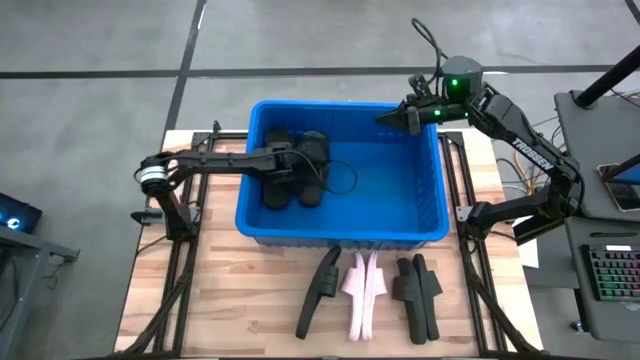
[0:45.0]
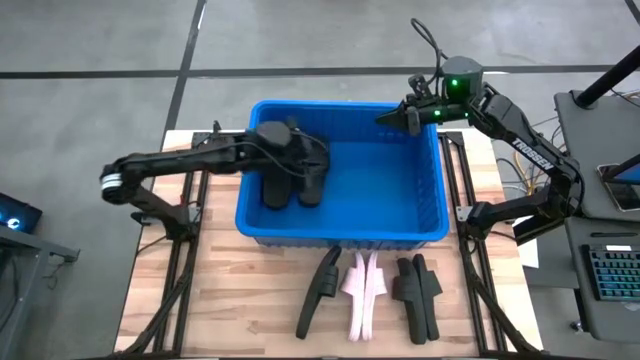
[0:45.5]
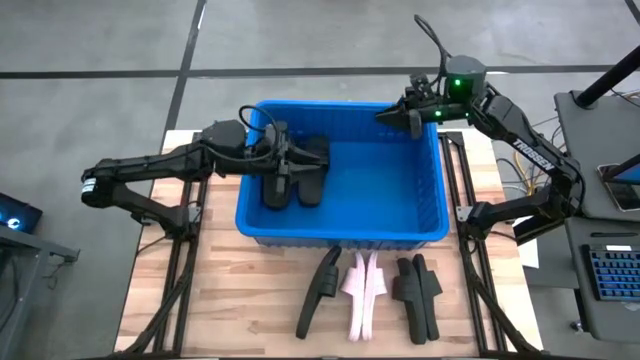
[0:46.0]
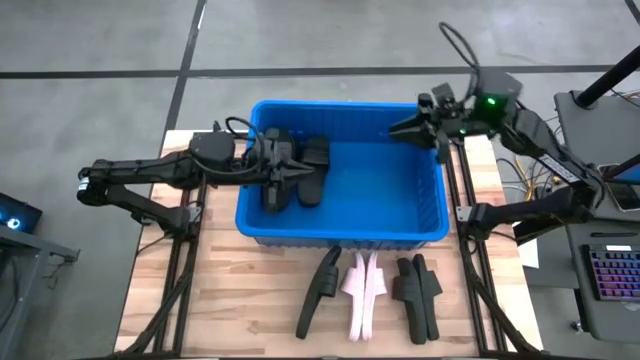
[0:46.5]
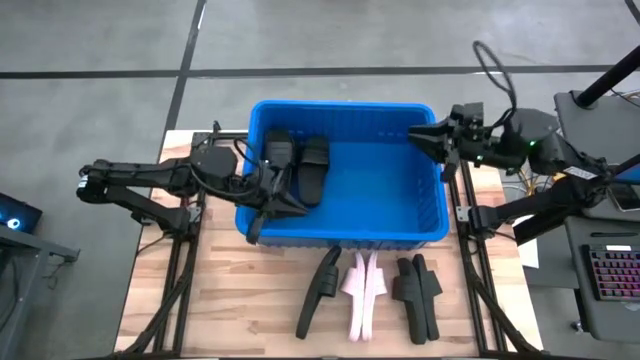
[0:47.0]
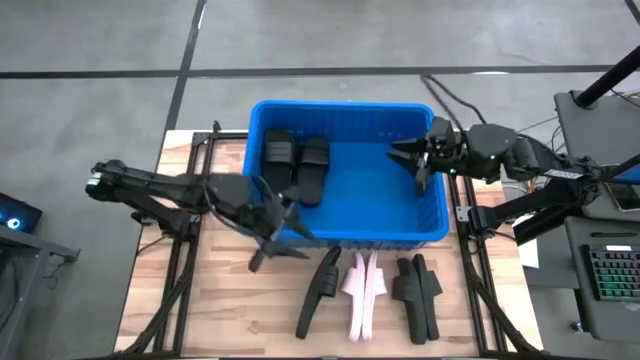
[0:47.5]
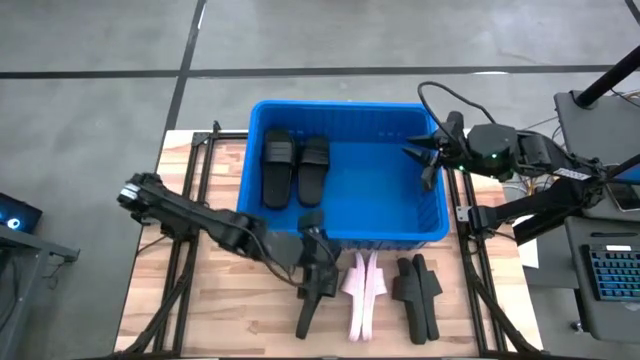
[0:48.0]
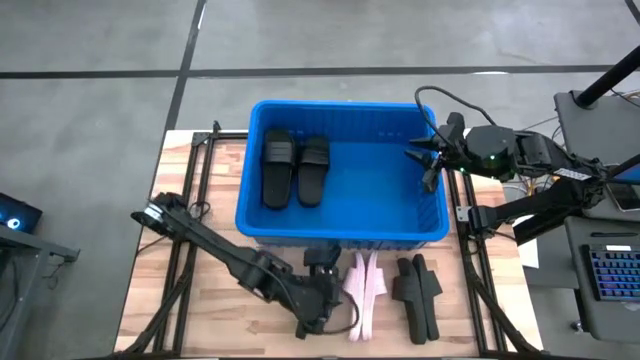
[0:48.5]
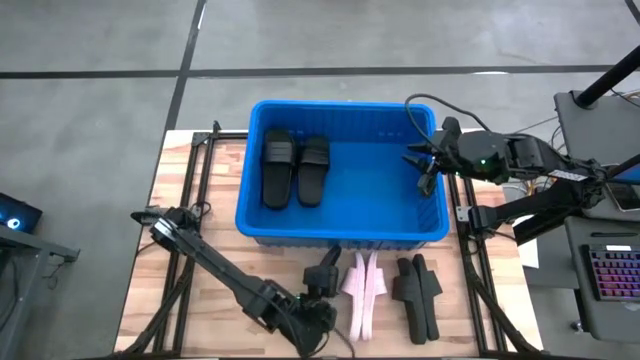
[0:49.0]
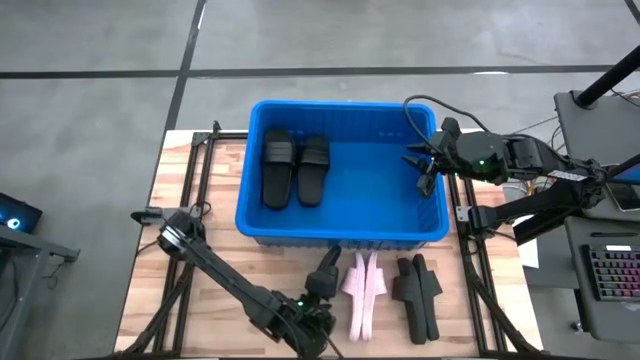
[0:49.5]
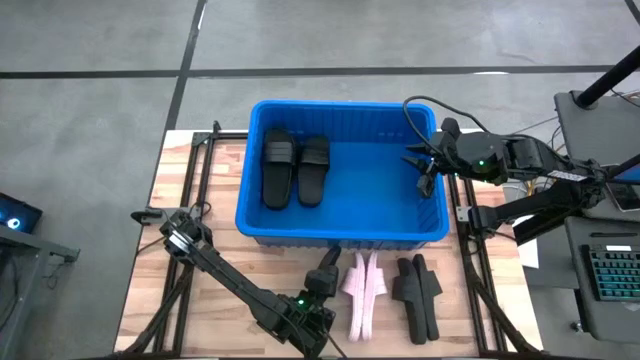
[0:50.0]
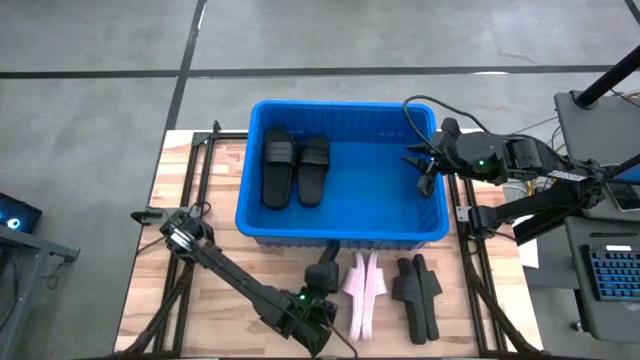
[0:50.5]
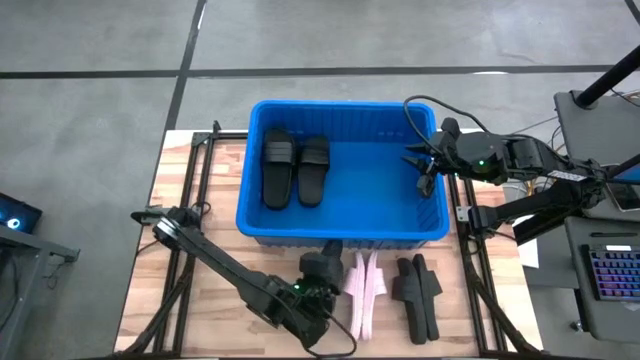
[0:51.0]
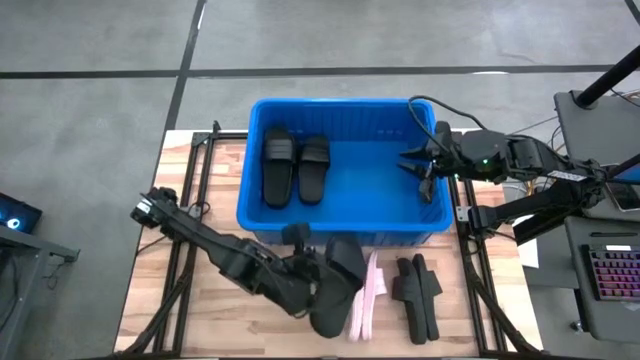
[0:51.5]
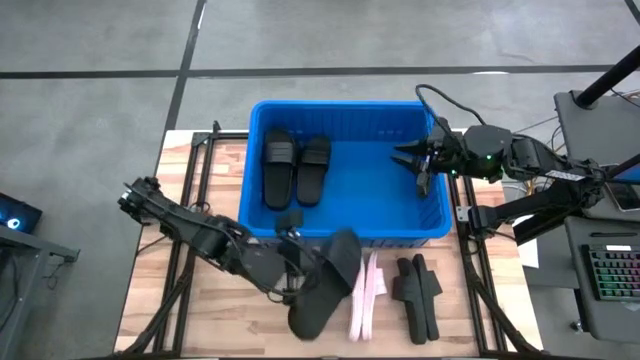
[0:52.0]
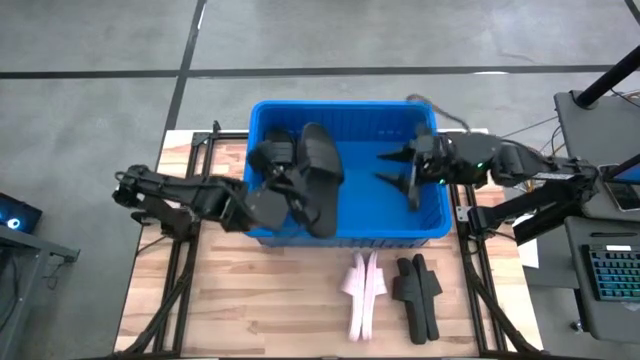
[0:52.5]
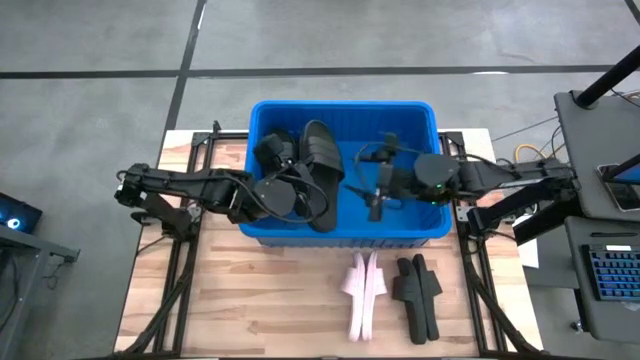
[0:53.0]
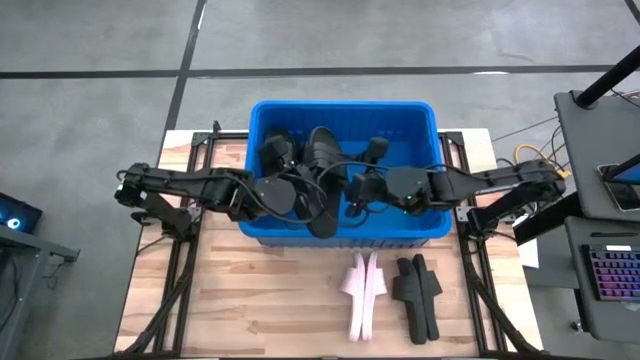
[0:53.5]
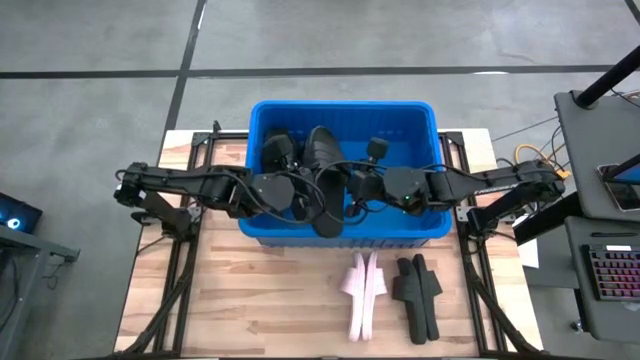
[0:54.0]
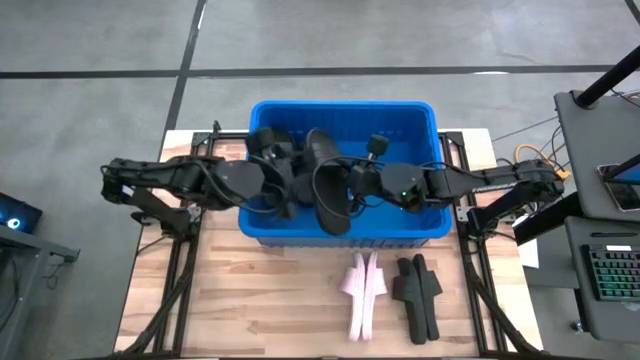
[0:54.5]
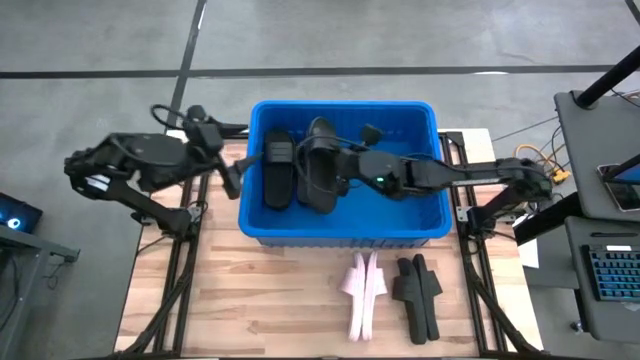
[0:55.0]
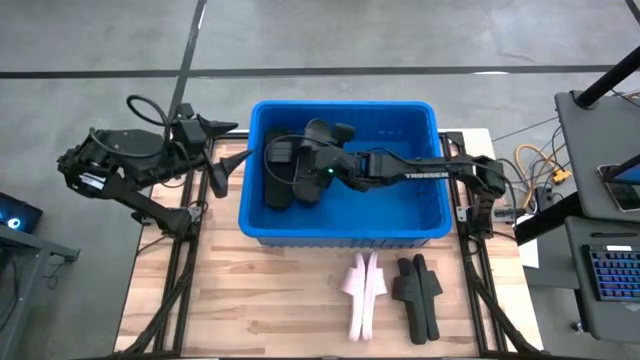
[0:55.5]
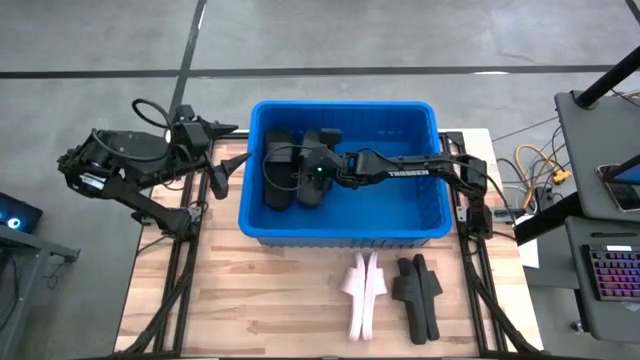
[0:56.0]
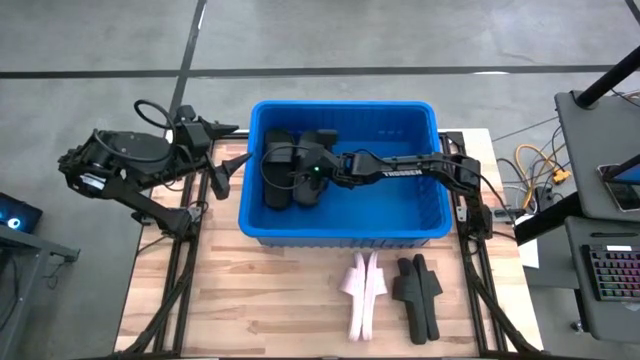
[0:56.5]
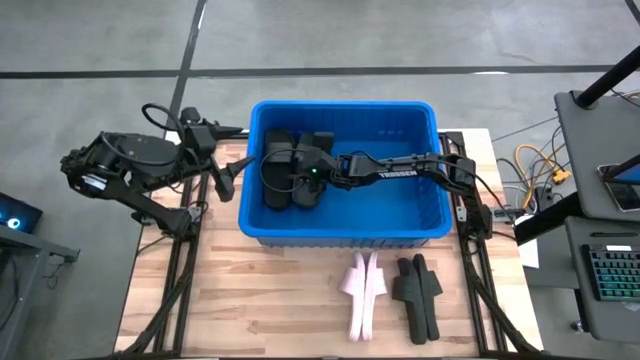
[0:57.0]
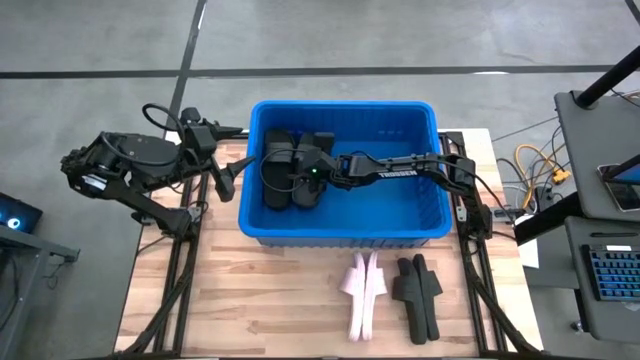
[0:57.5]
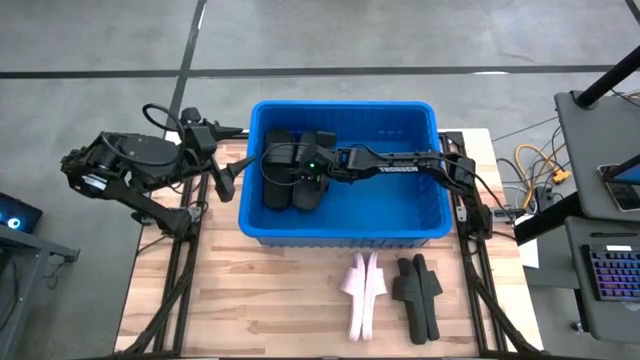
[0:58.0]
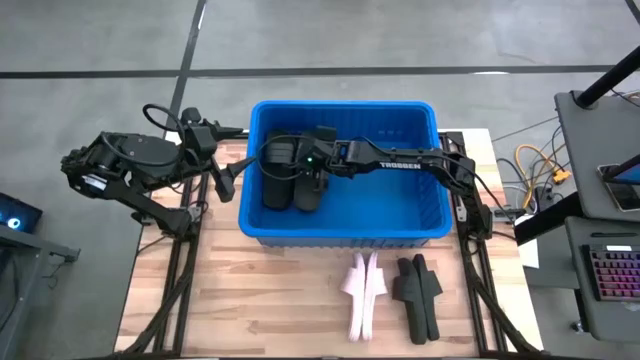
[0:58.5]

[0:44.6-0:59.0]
Task: Pick and place slides into bin
Put the black slides into the blue bin

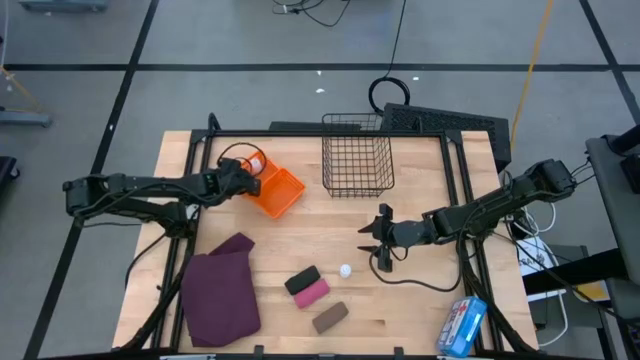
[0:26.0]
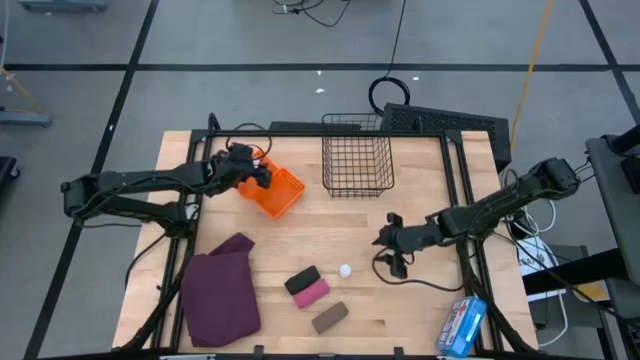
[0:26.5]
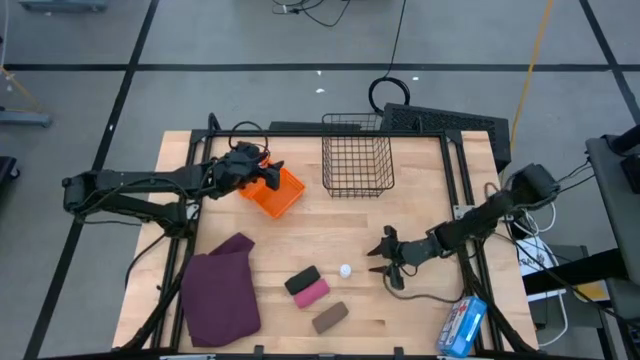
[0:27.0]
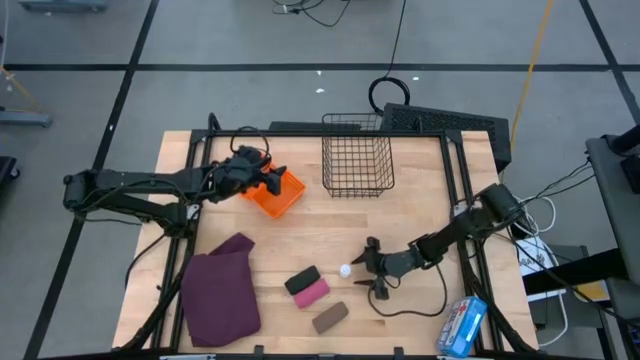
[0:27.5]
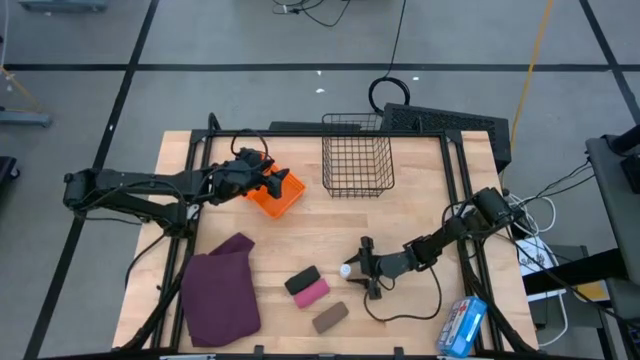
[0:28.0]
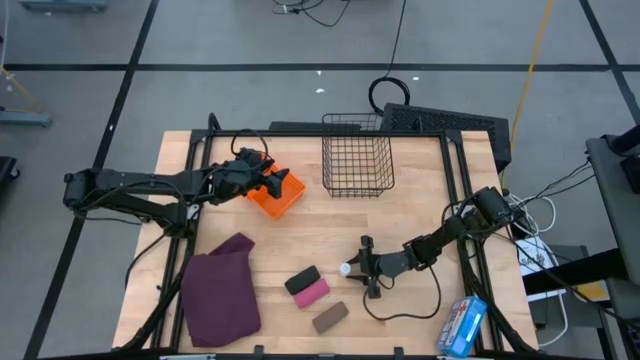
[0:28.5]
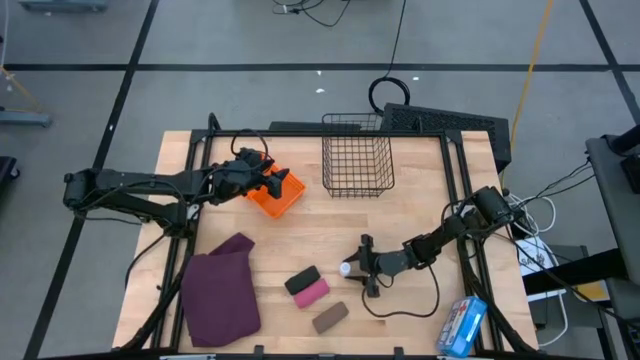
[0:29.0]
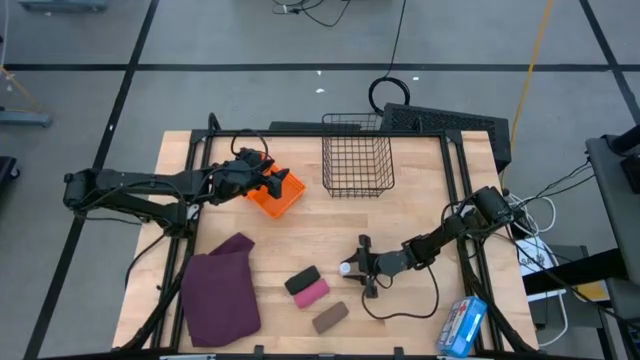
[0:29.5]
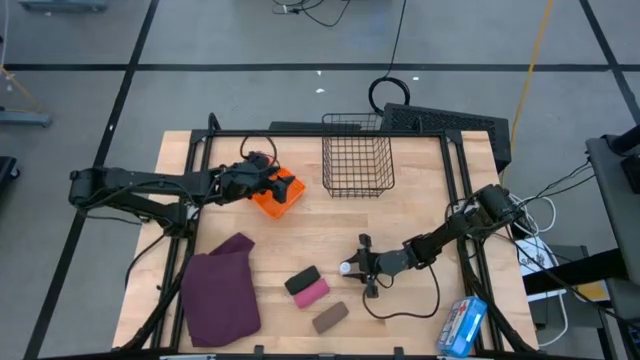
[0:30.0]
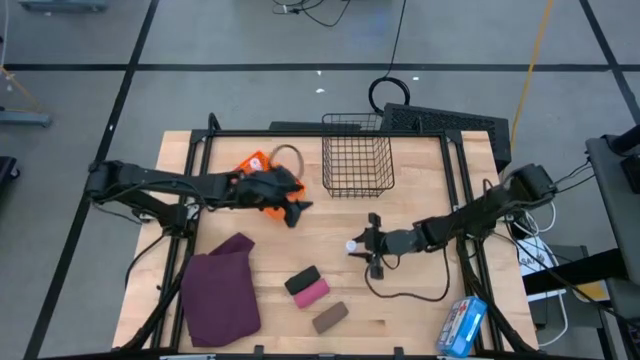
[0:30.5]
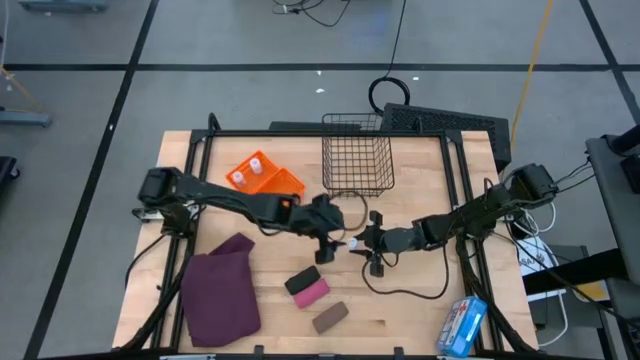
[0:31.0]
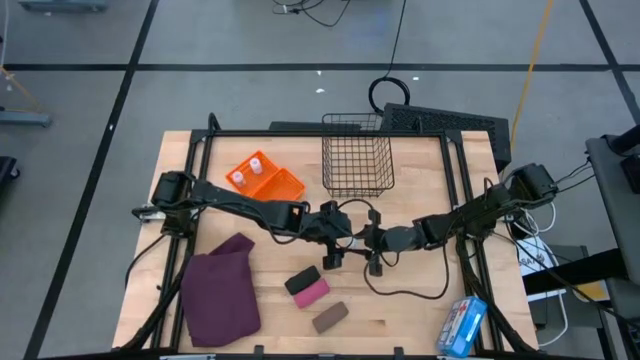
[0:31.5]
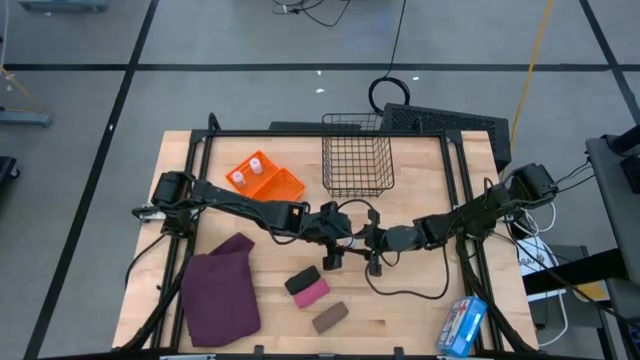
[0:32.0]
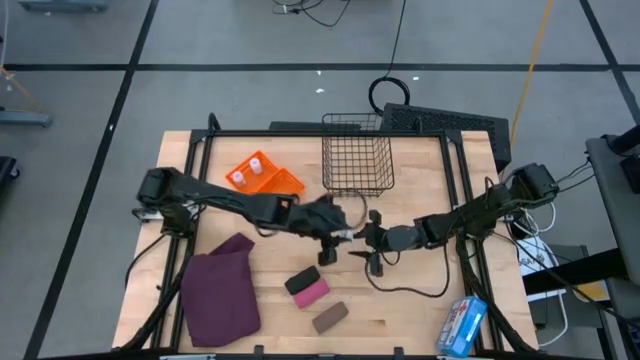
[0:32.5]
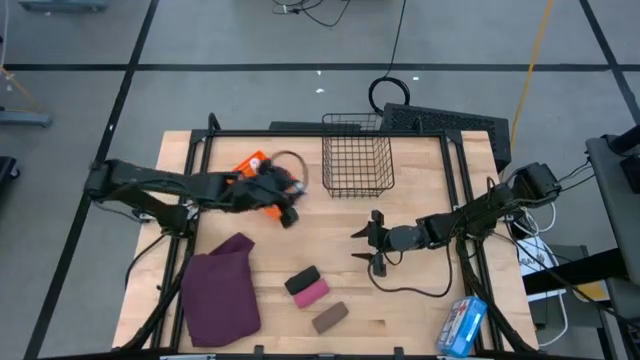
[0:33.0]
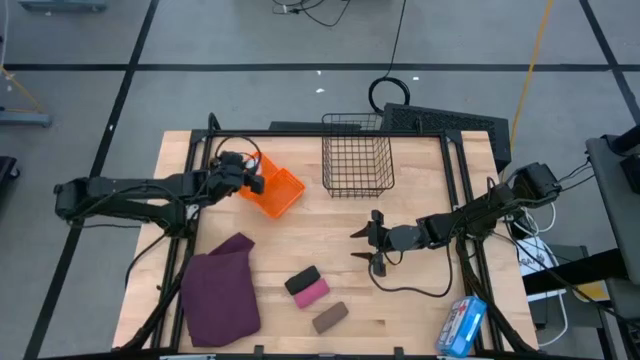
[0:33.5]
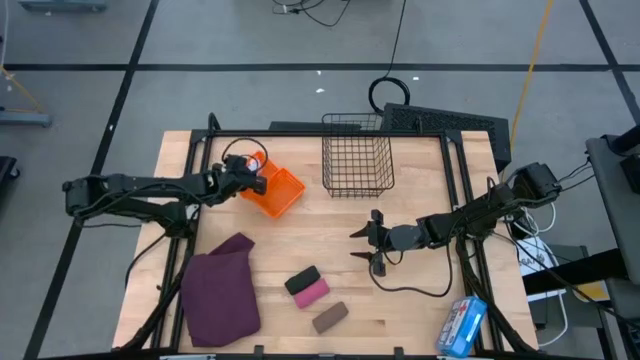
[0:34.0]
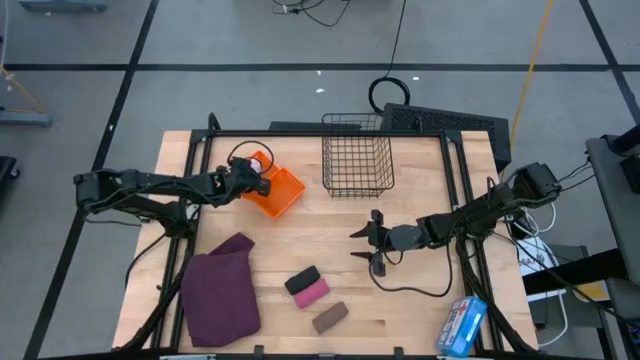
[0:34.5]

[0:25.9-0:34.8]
Task: Pick & Place Medicine items
Put the white pill bottle into the top orange basket
